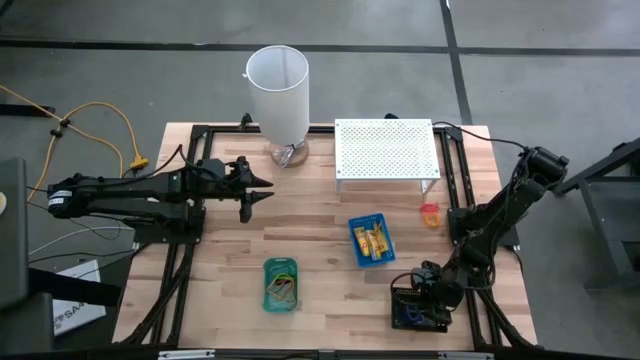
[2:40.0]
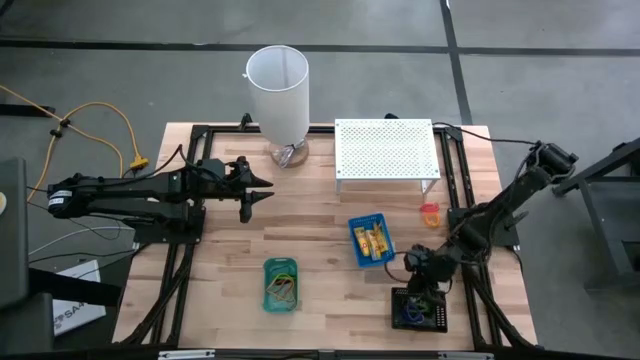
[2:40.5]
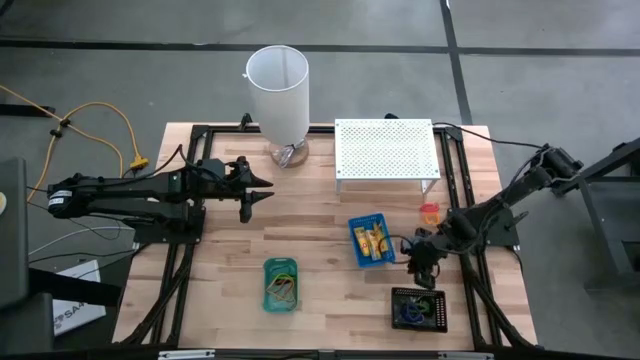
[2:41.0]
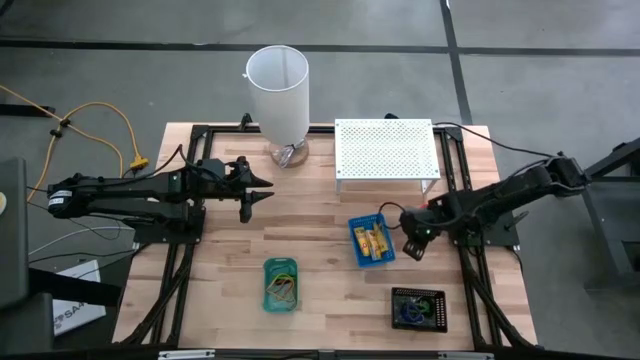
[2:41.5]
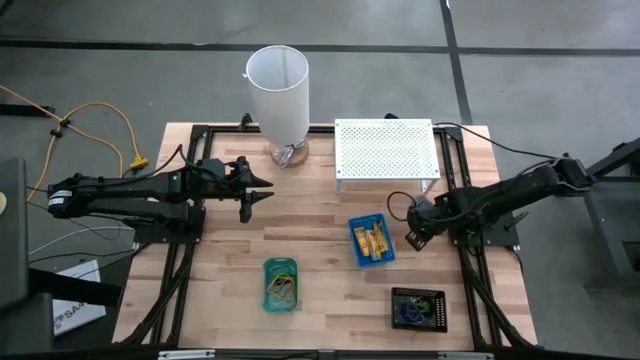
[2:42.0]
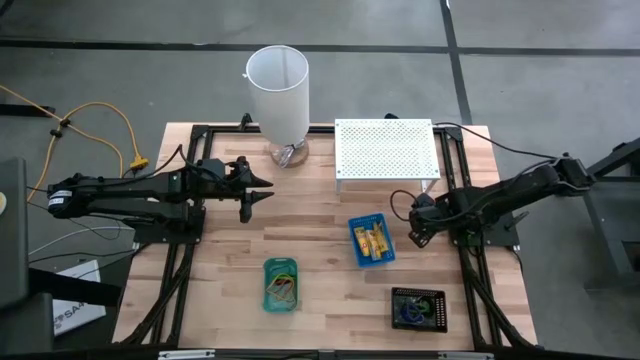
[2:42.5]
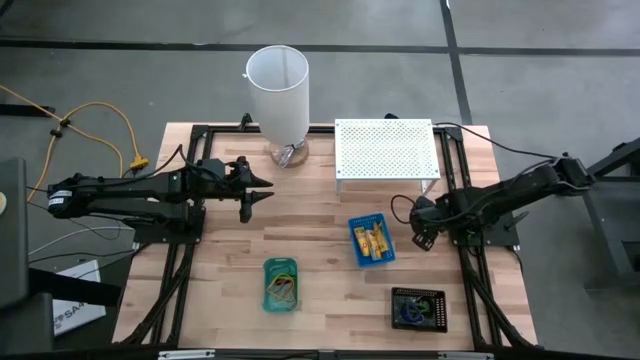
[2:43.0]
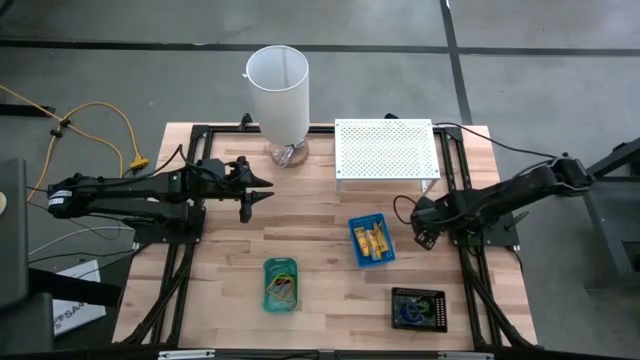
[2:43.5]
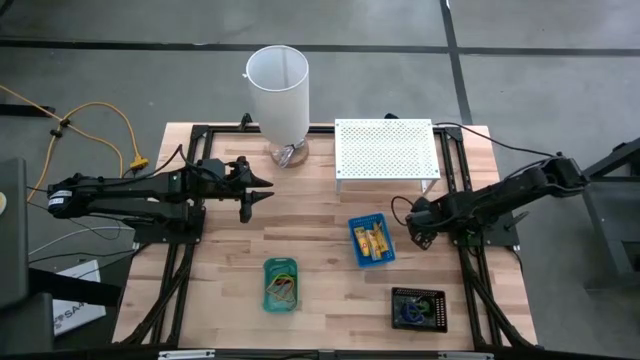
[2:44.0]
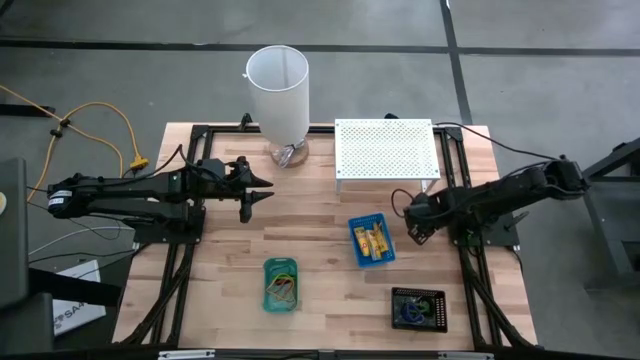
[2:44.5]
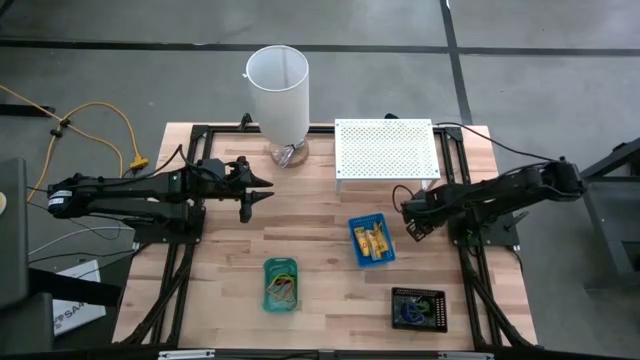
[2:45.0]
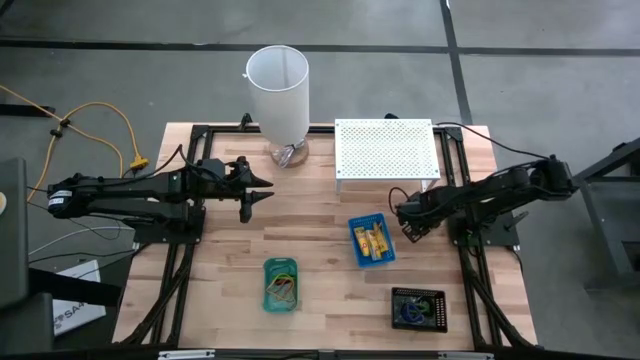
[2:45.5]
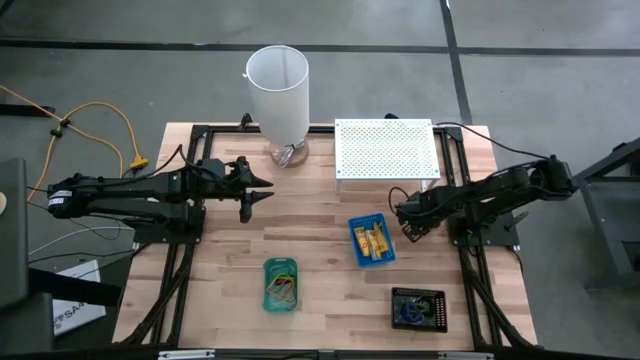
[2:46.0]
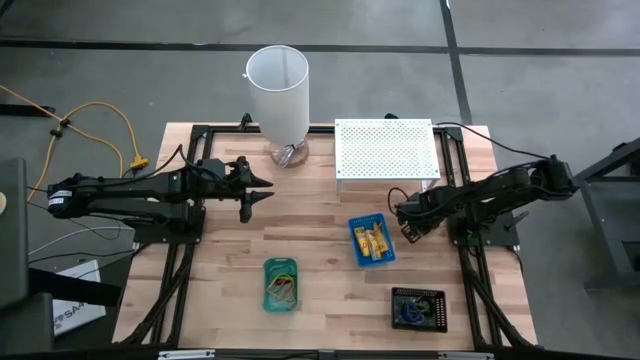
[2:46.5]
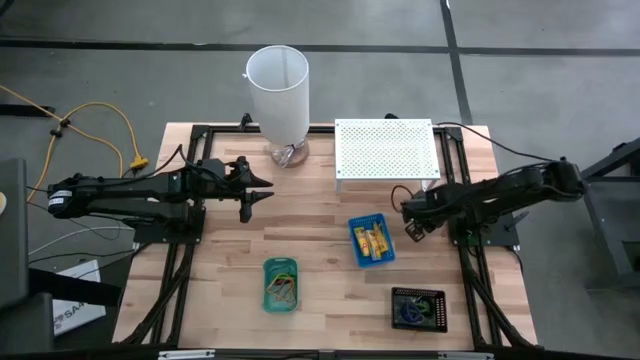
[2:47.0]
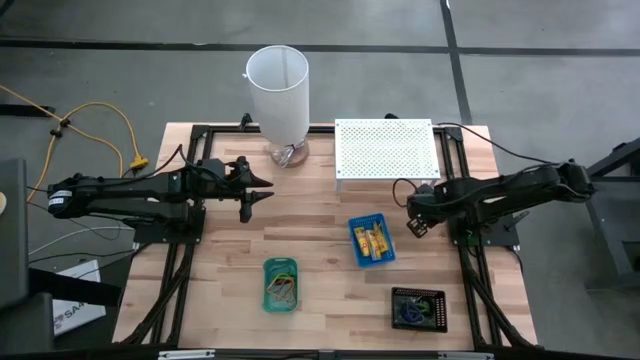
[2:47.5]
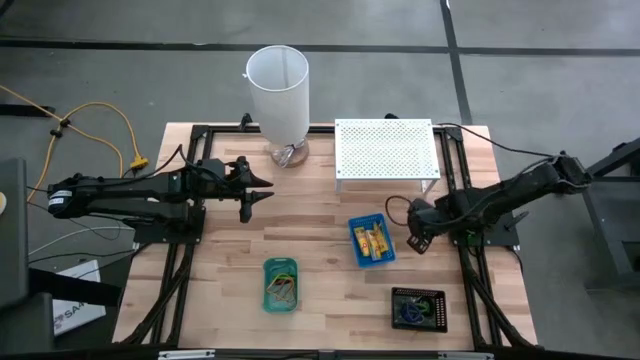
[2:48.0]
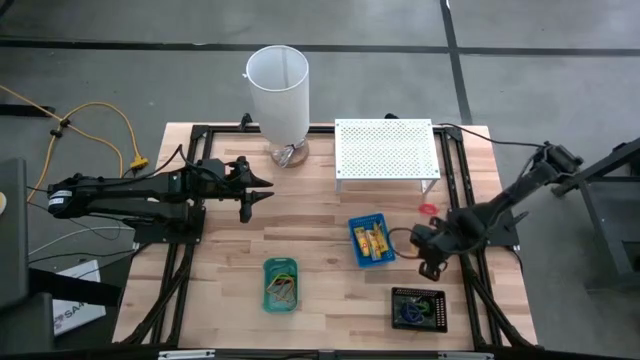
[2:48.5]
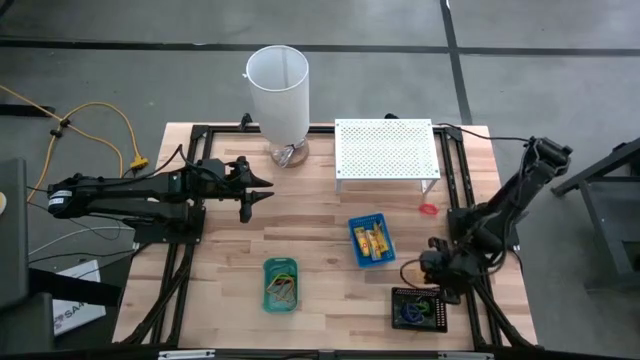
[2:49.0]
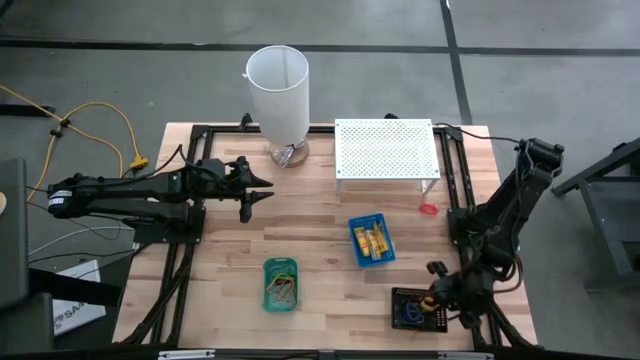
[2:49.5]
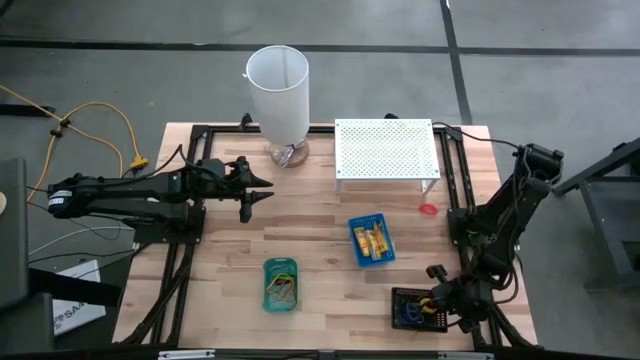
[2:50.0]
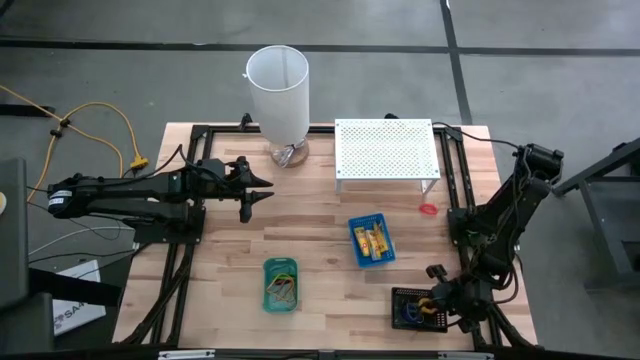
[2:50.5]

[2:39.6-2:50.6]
Task: Pick & Place Office Desk Supplies
Put the yellow spring rubber band into the black bin

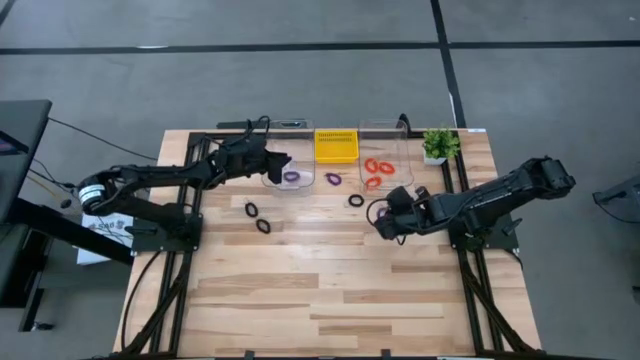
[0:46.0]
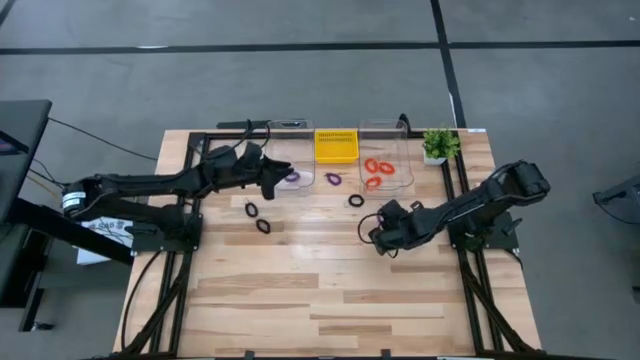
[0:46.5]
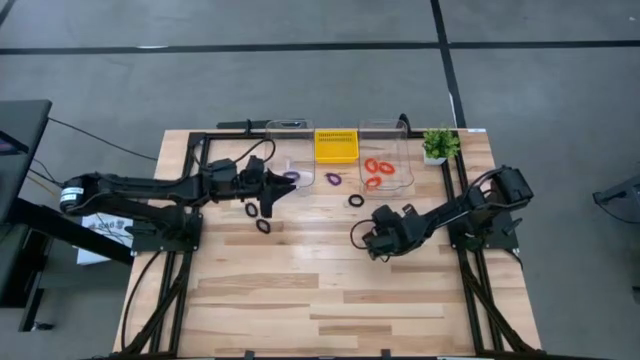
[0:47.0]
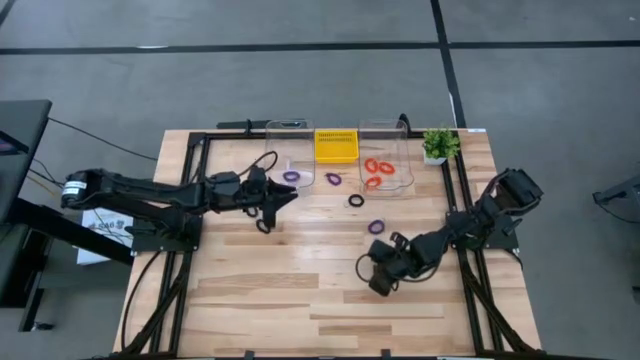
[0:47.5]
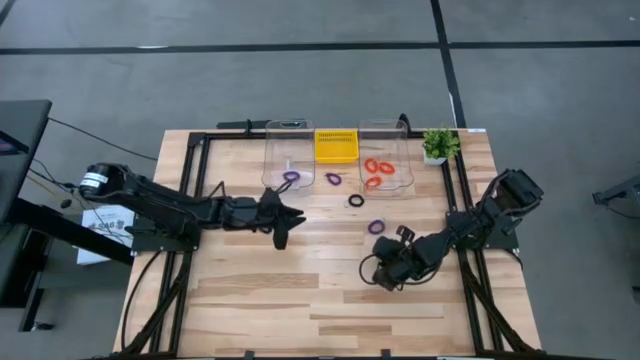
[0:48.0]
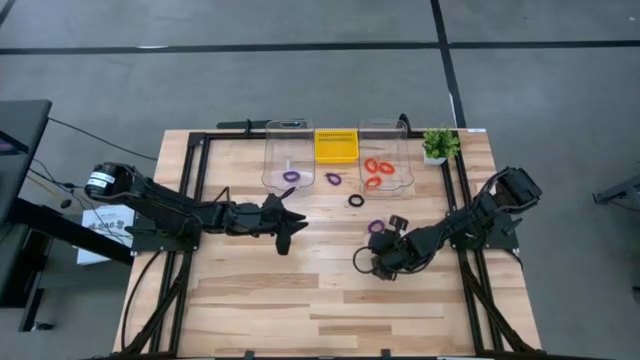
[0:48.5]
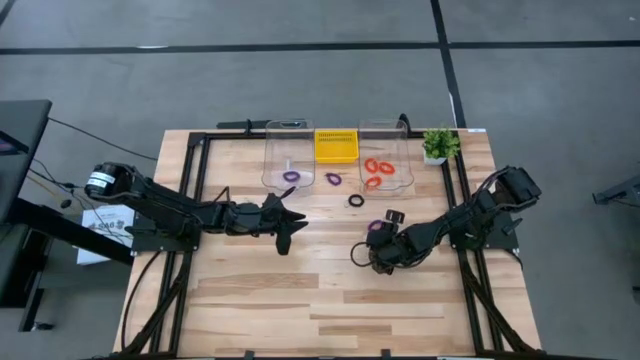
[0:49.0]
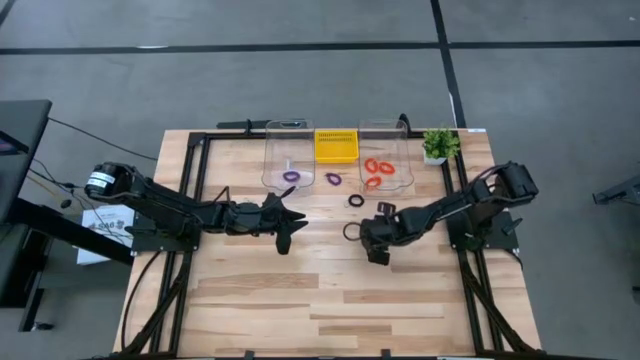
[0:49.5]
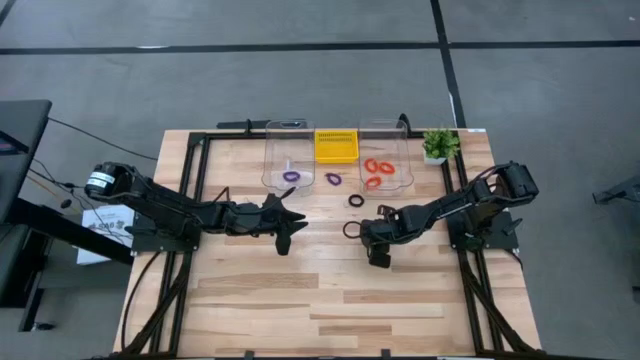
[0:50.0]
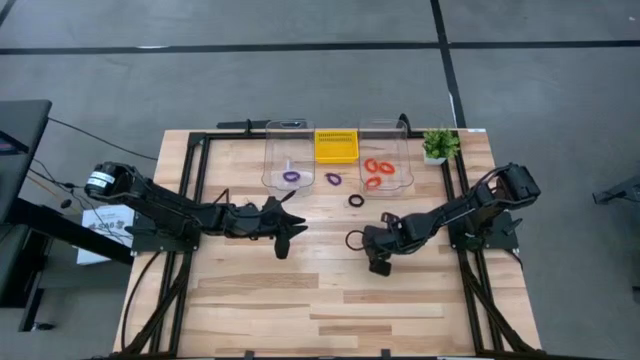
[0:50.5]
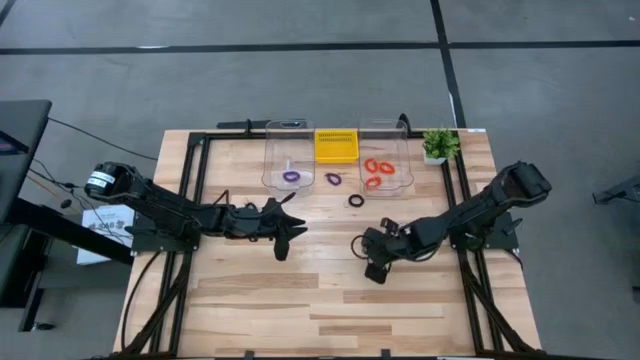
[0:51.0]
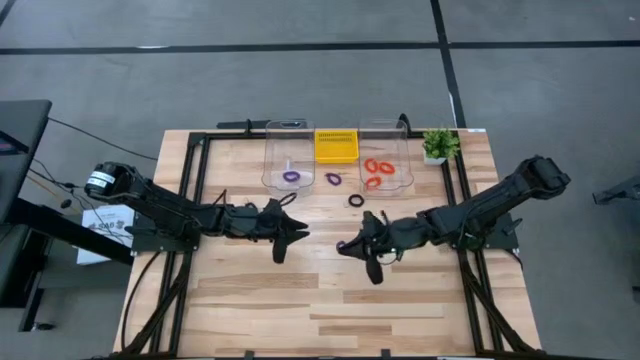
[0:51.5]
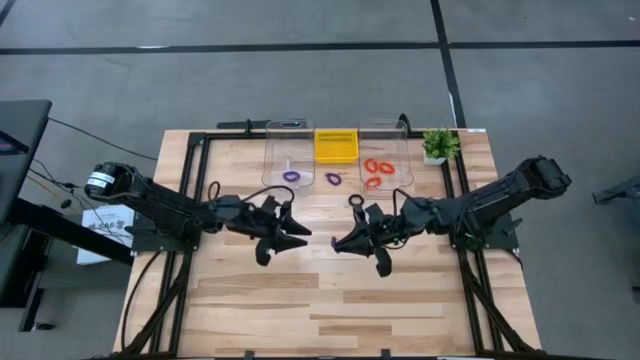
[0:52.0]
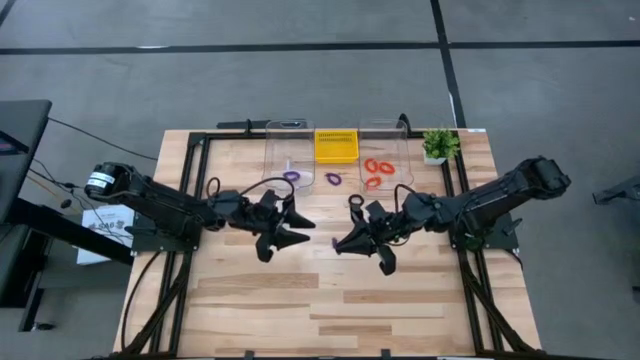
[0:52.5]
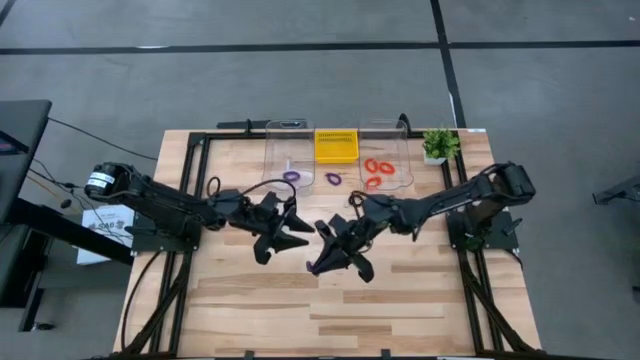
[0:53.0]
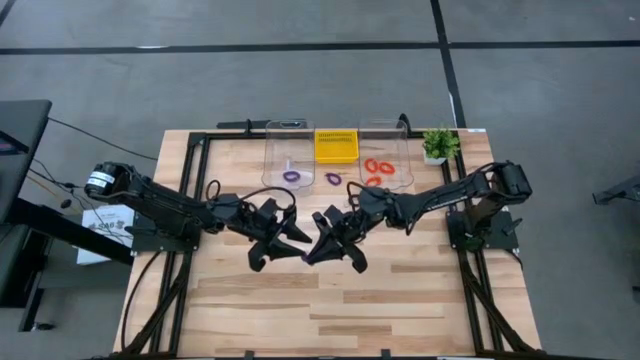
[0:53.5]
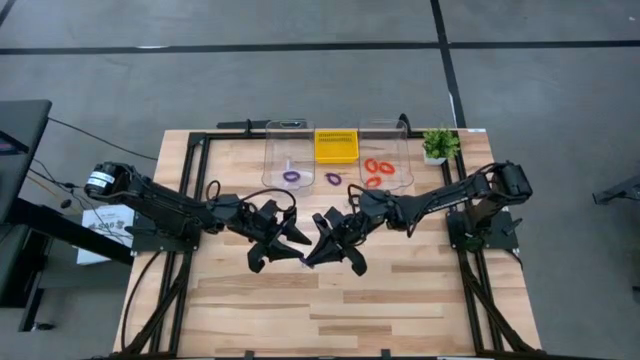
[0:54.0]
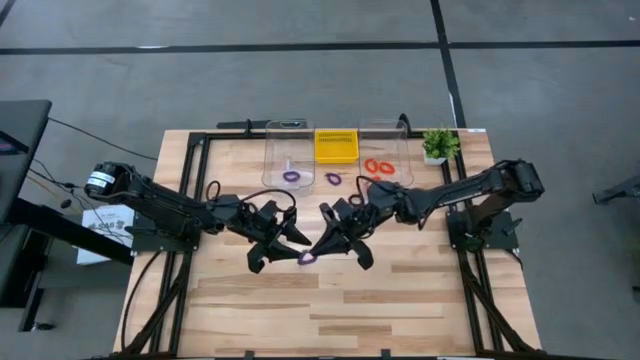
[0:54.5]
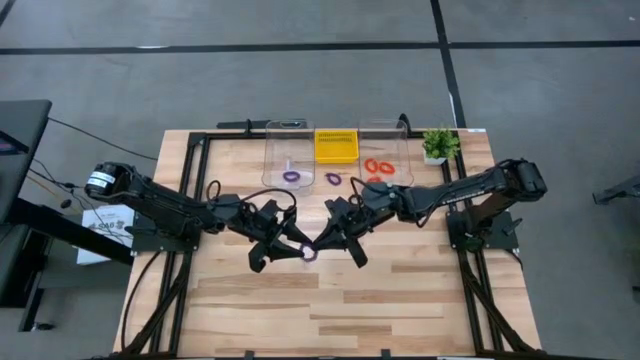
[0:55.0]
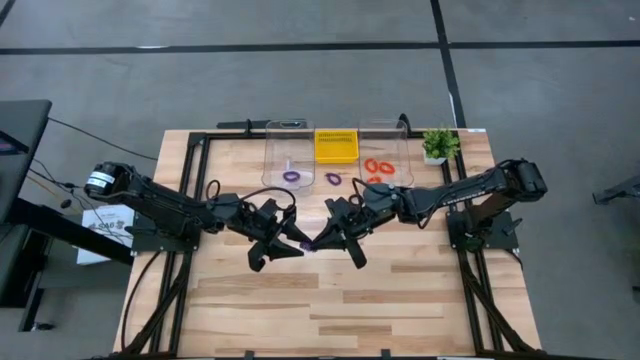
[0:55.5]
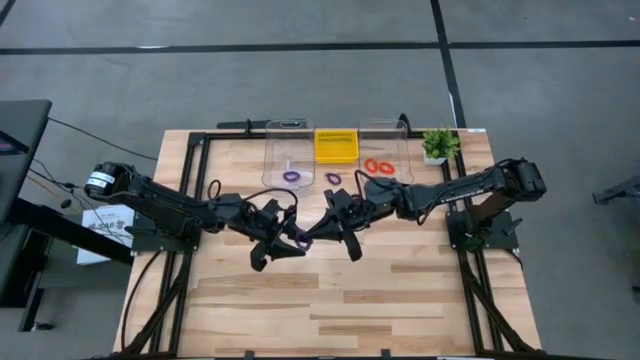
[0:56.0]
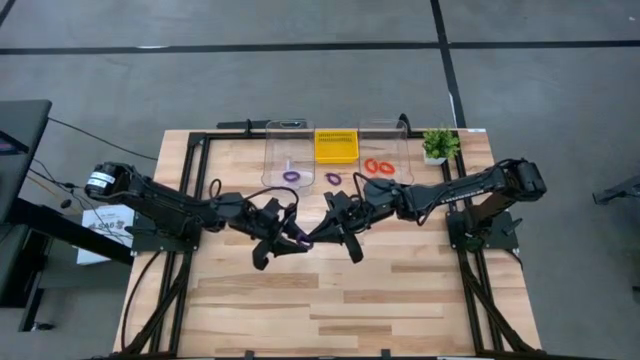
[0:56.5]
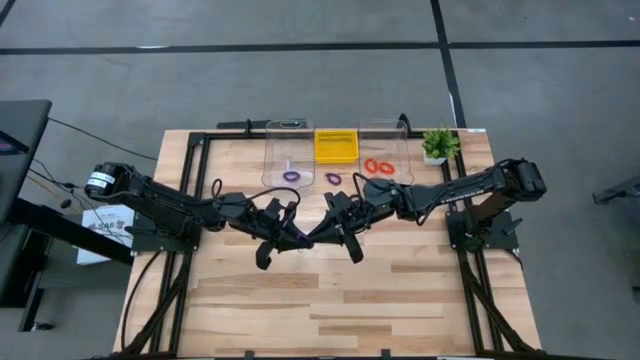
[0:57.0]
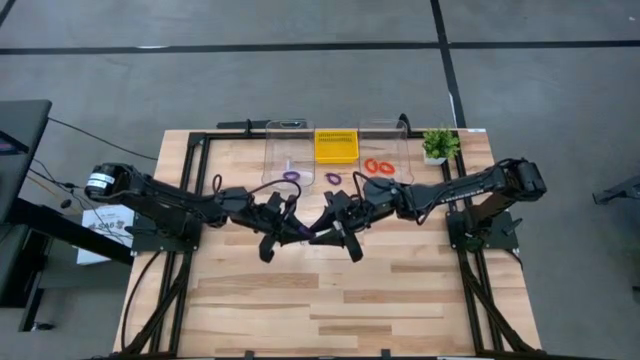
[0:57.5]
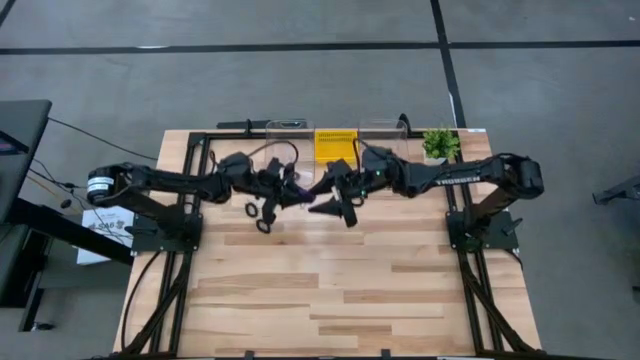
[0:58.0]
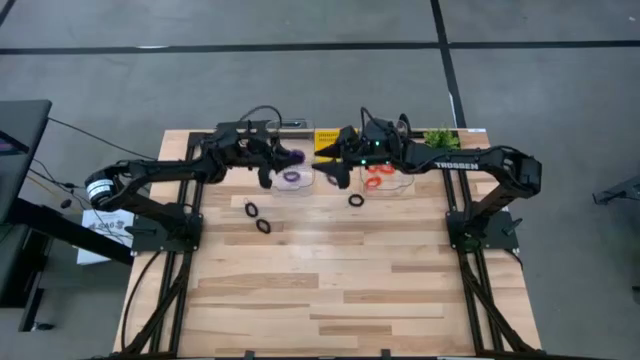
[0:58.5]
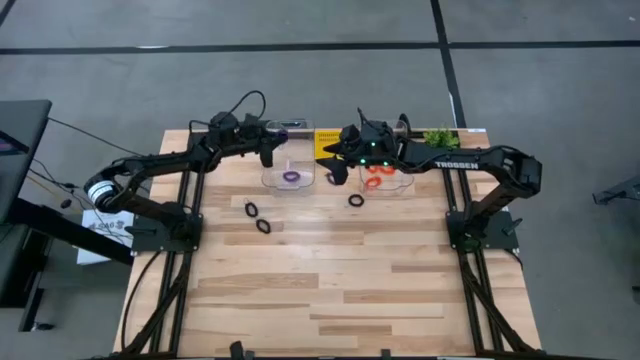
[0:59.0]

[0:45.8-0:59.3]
Task: Sort spring keychains
Put the bottom purple spring keychain into the left transparent bin
